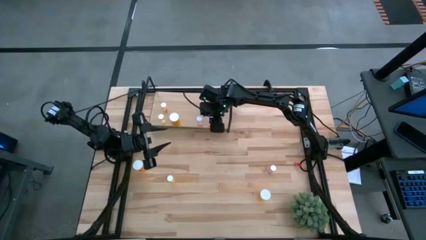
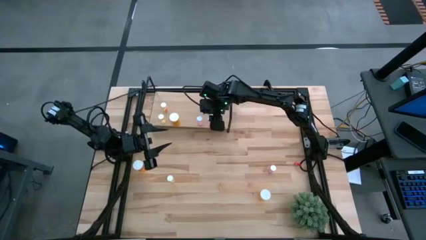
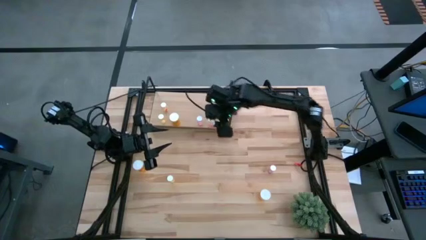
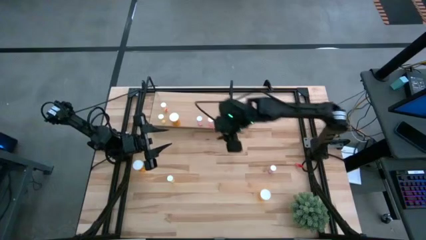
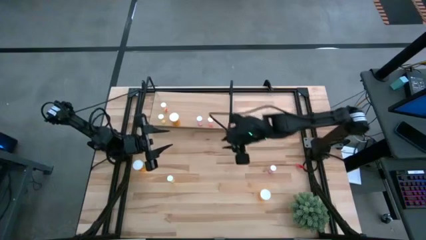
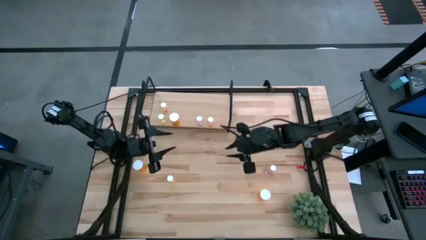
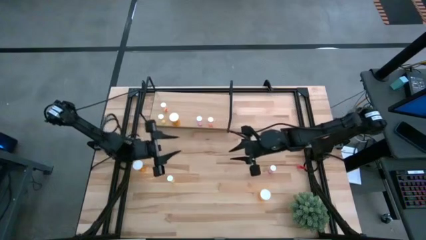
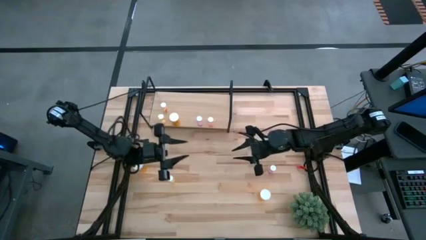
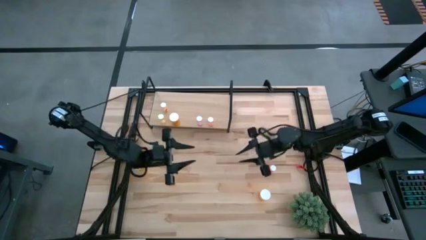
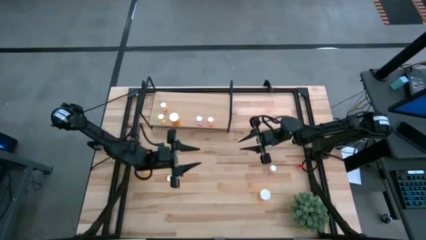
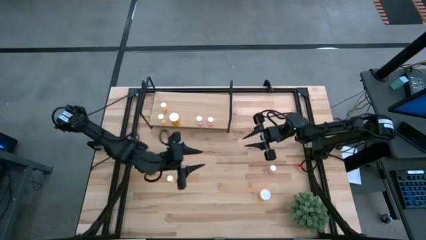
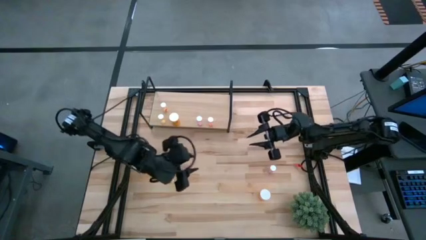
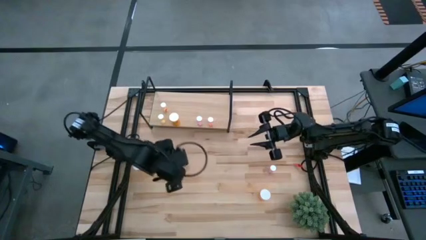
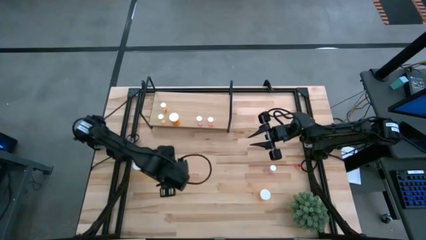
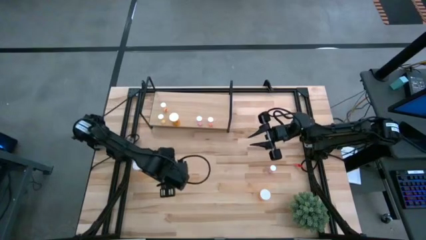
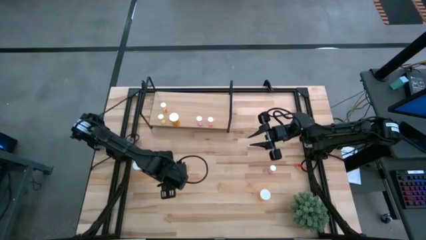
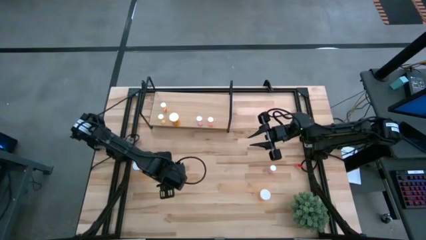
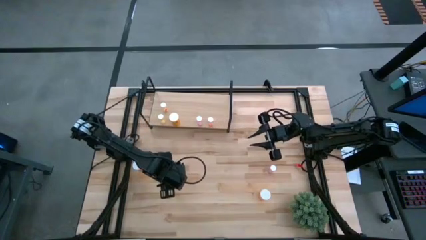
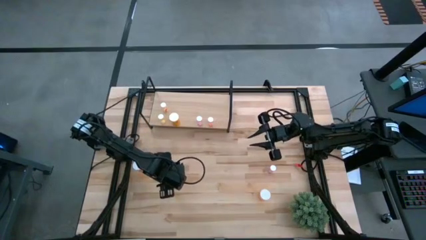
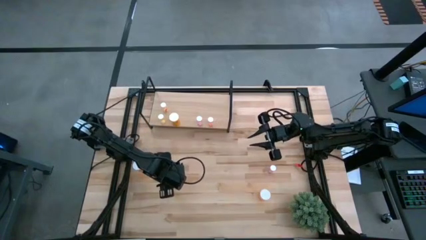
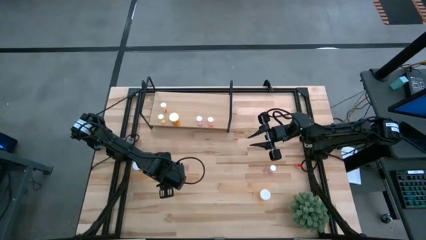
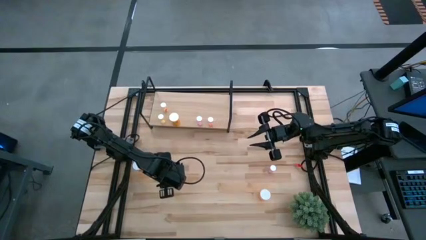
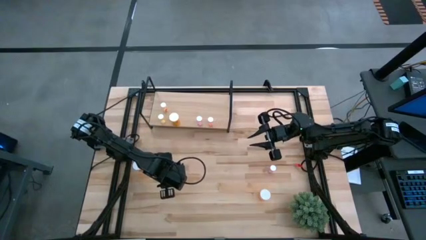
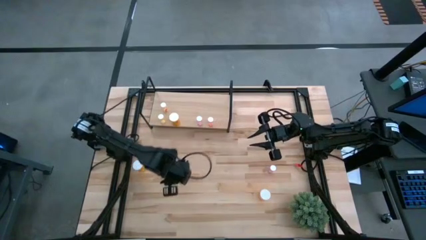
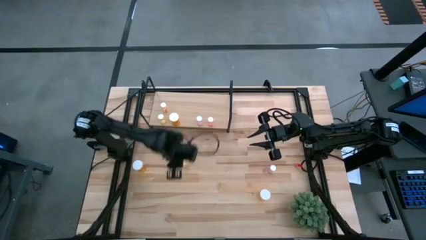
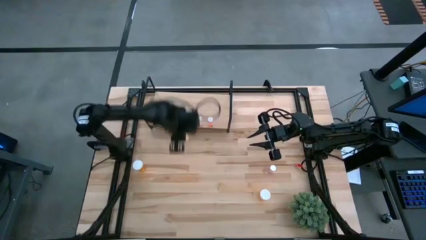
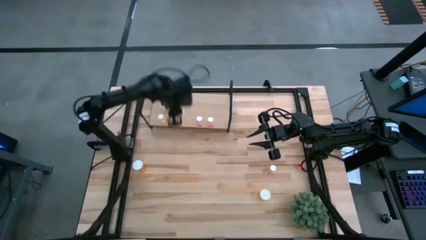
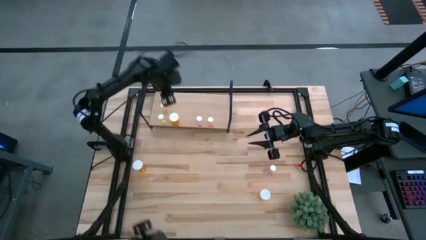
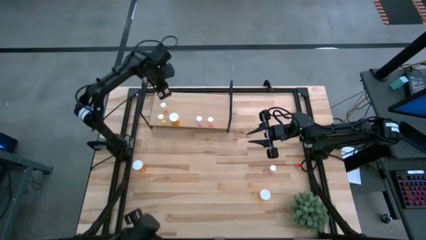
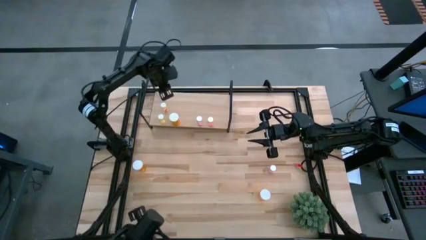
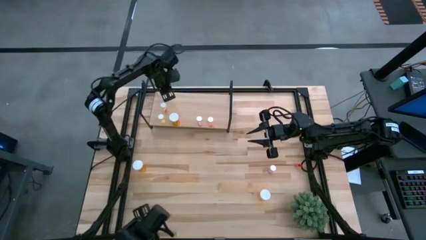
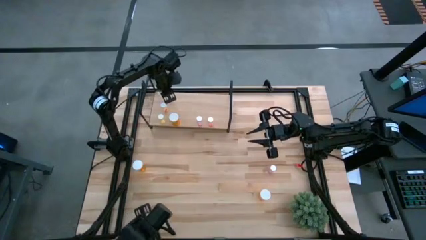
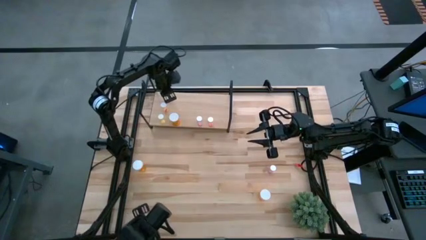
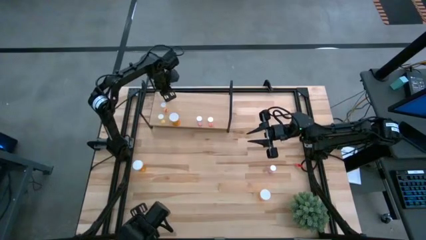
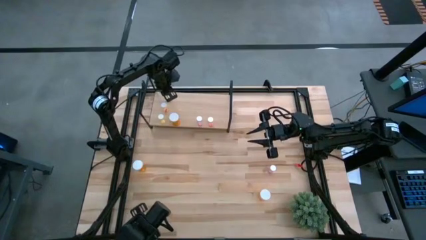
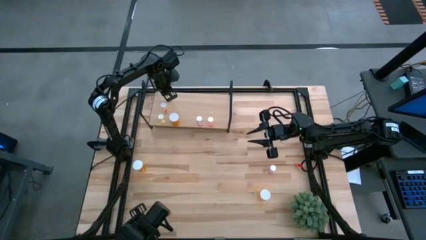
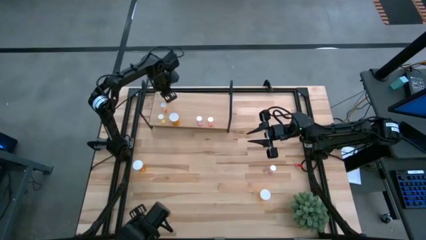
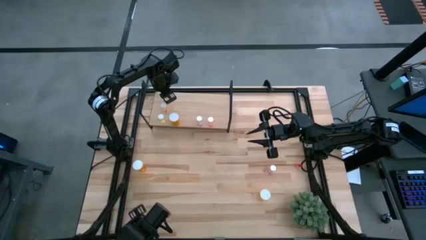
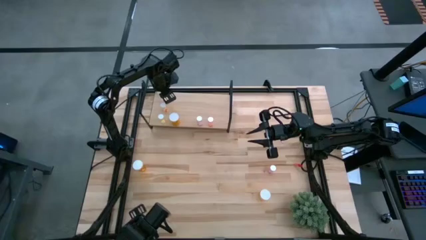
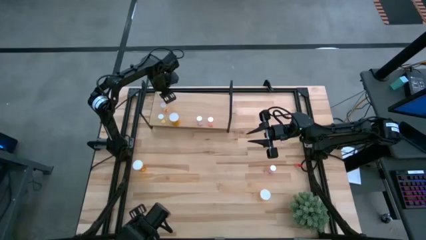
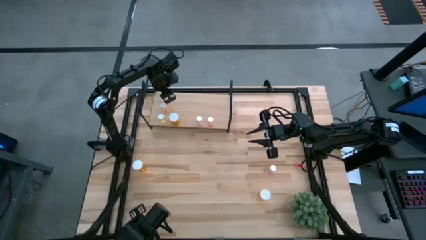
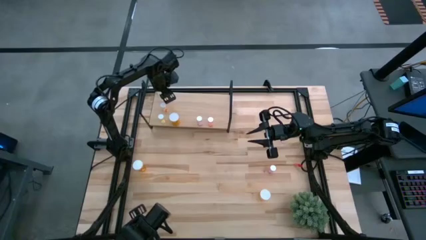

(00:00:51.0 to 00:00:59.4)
Task: Pick and place medicine bottles onto shelf by color
Put the yellow pill bottle on the shelf to align with the yellow pill bottles

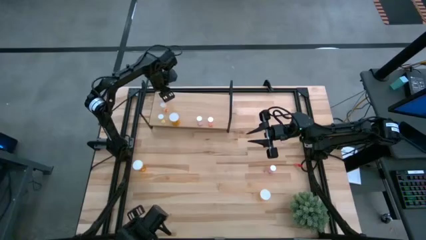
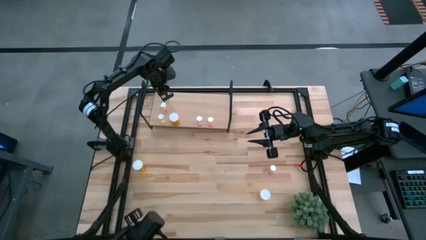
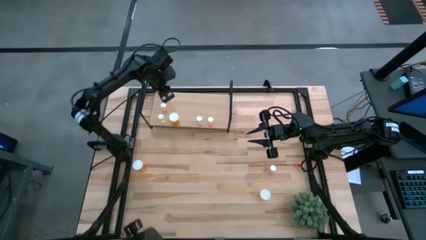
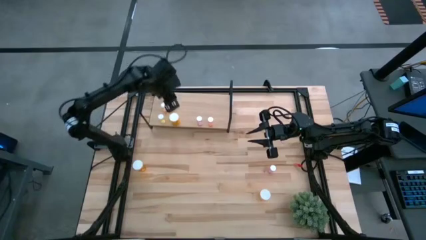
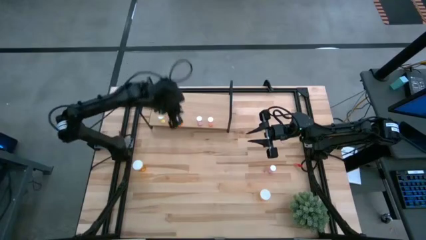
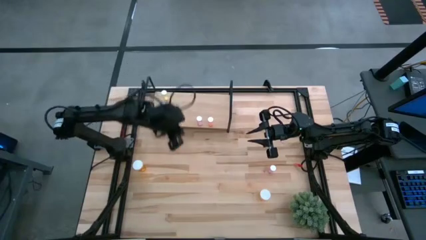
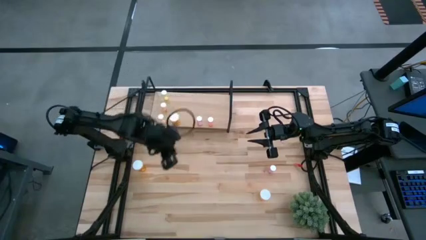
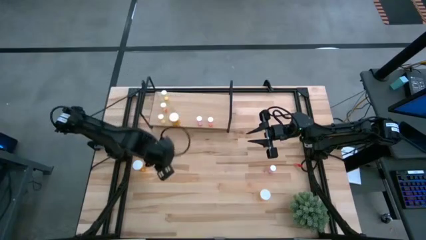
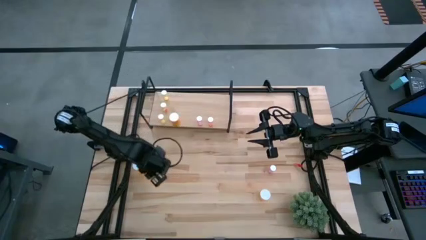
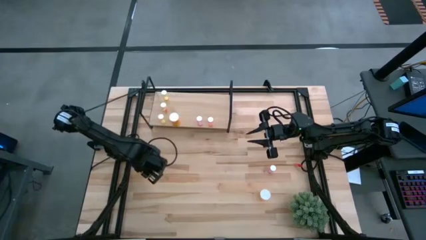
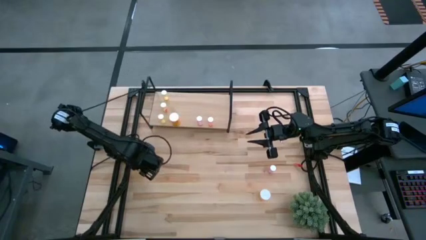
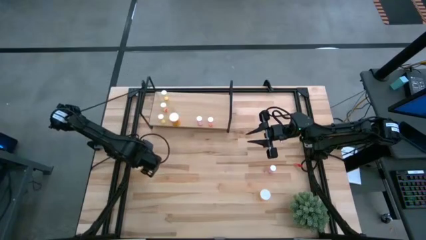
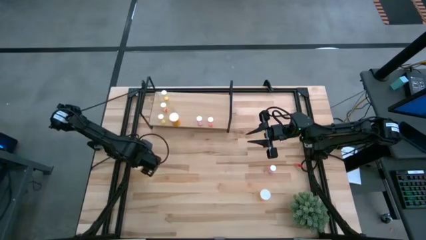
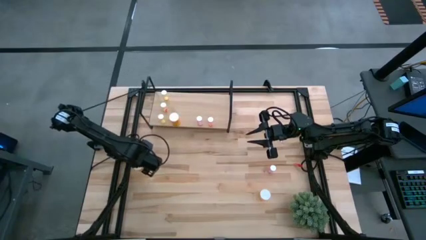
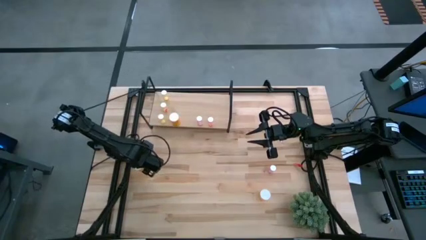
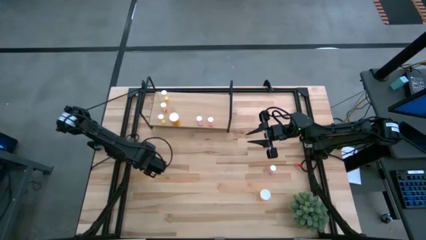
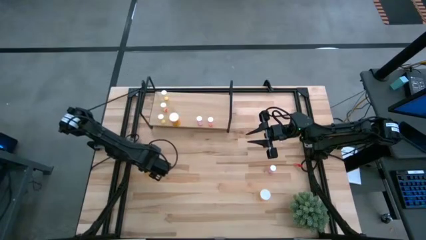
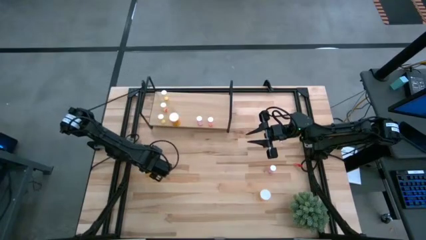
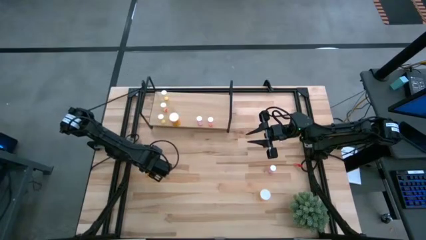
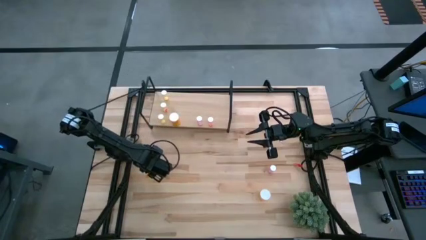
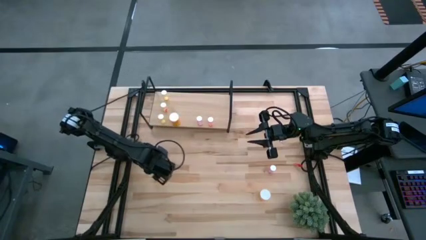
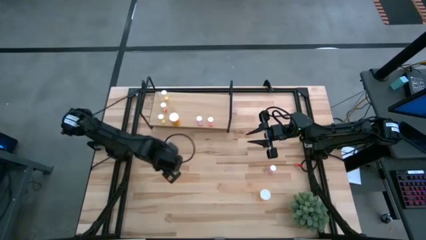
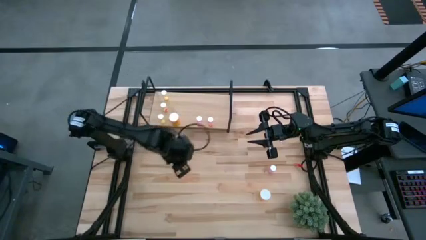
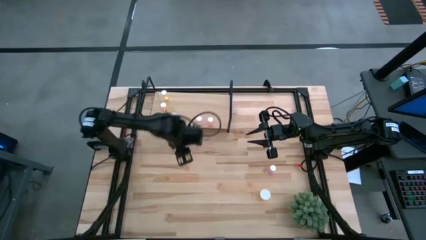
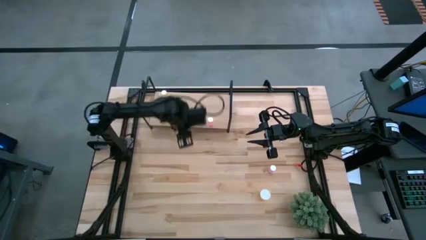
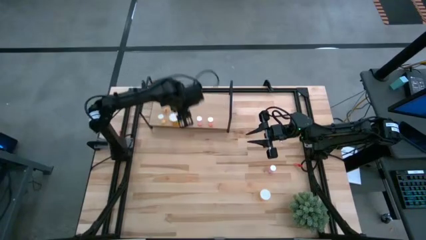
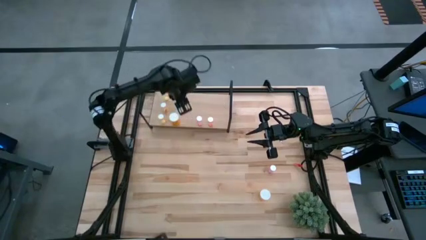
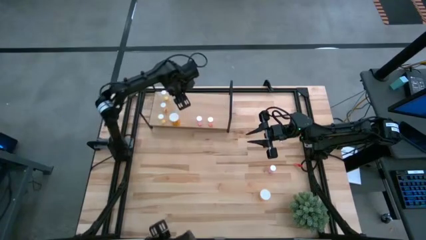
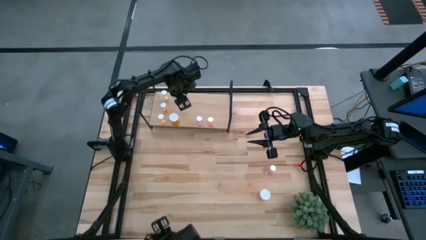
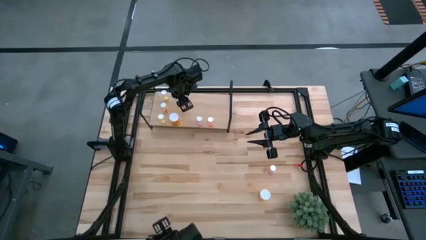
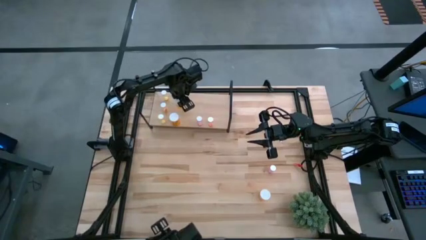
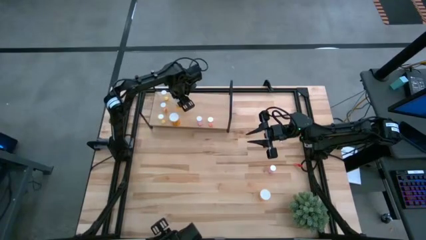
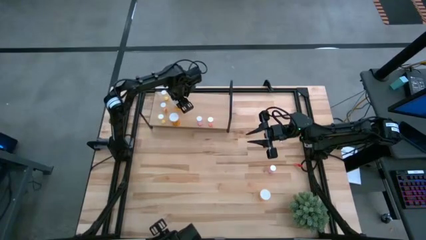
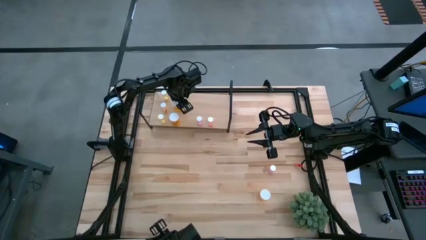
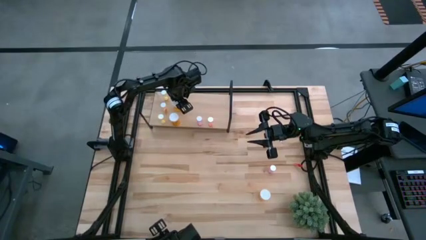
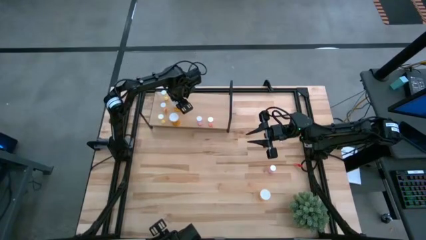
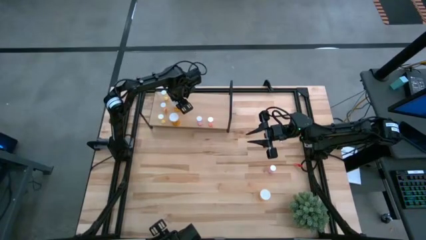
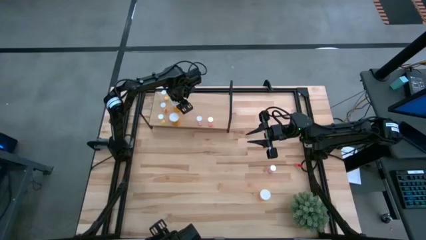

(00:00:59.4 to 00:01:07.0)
Put the left orange pill bottle on the shelf to align with the orange pill bottle
